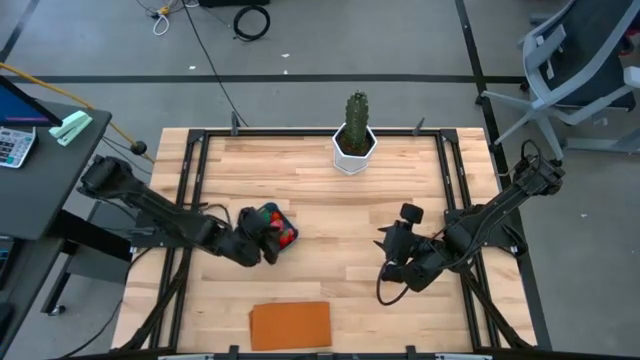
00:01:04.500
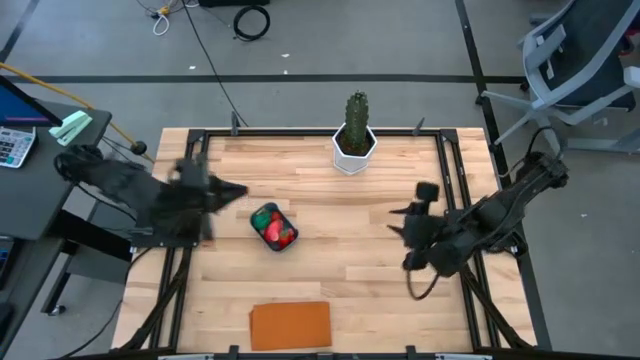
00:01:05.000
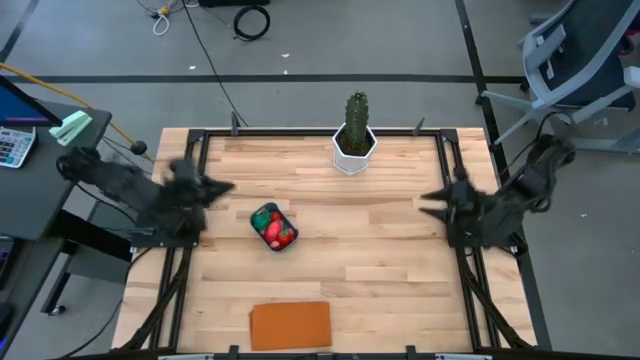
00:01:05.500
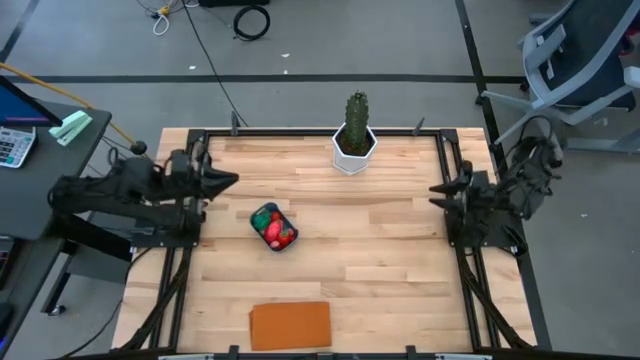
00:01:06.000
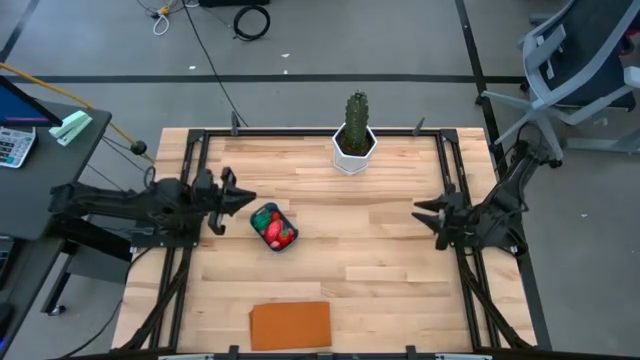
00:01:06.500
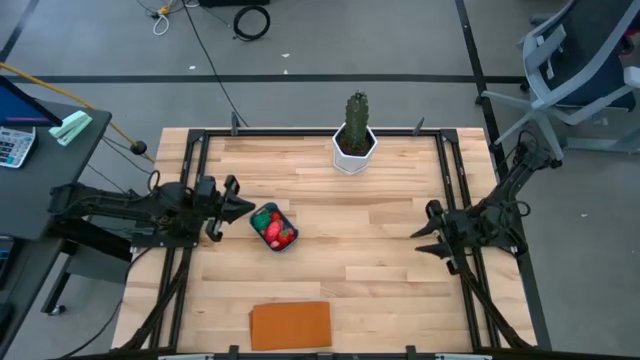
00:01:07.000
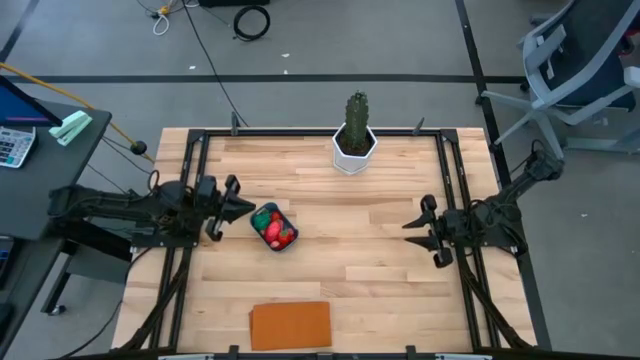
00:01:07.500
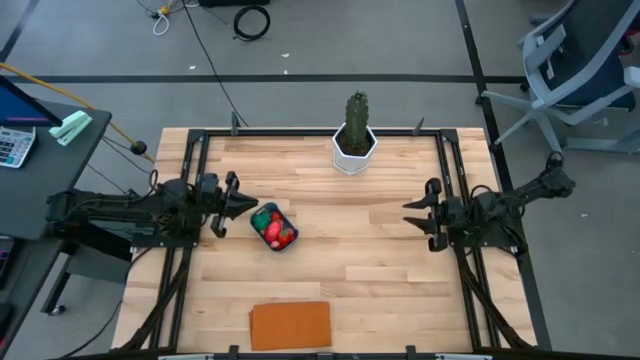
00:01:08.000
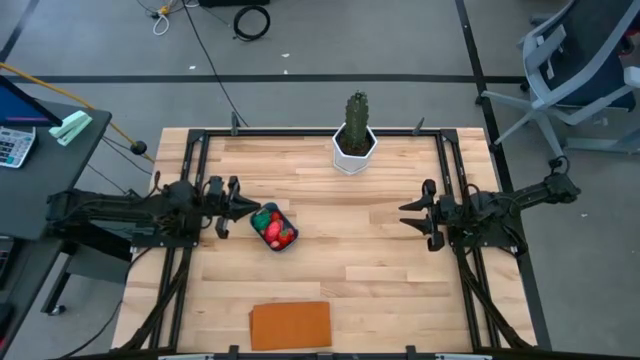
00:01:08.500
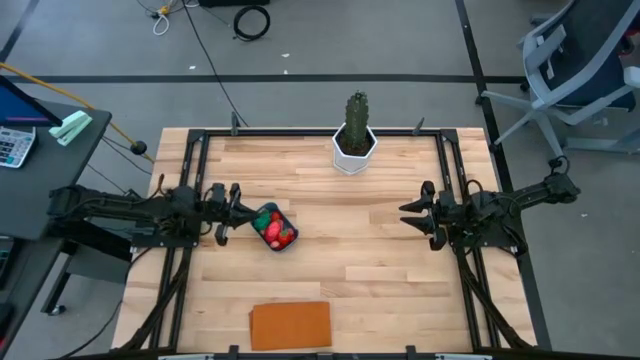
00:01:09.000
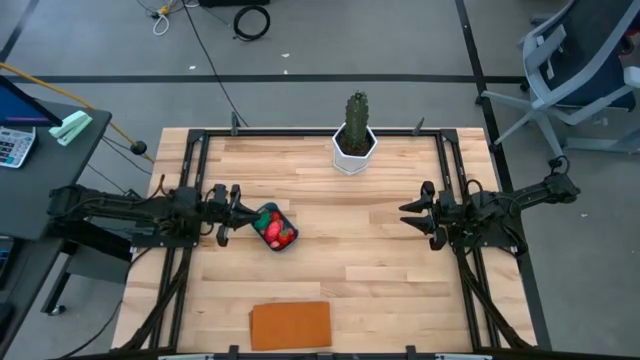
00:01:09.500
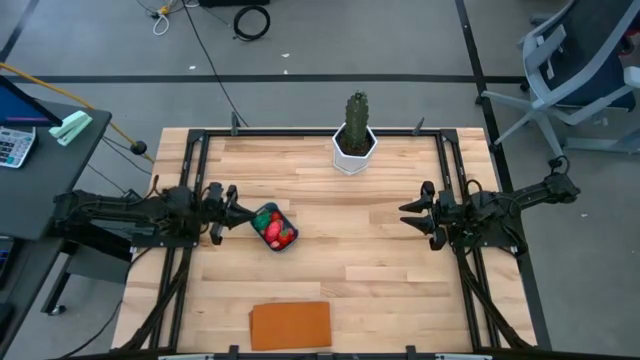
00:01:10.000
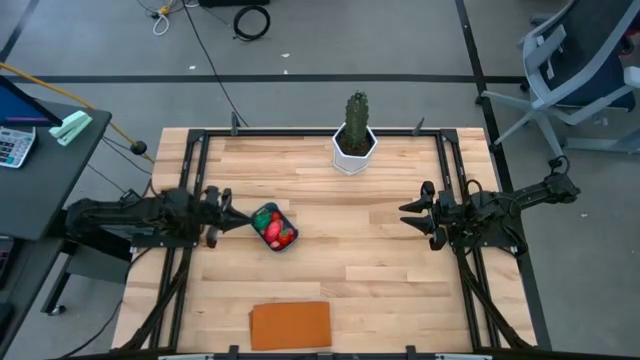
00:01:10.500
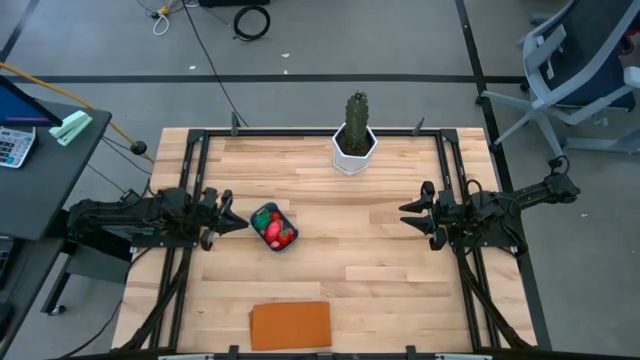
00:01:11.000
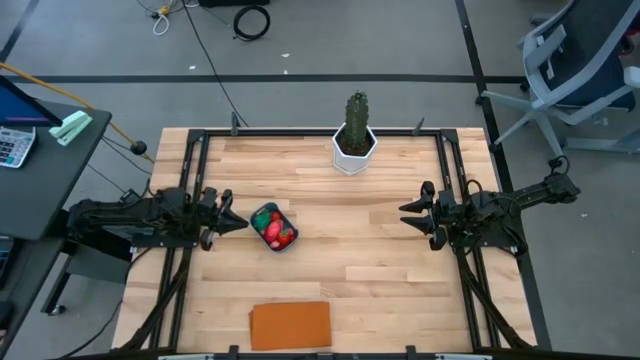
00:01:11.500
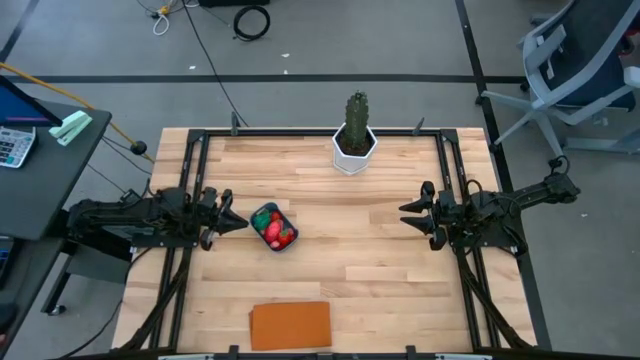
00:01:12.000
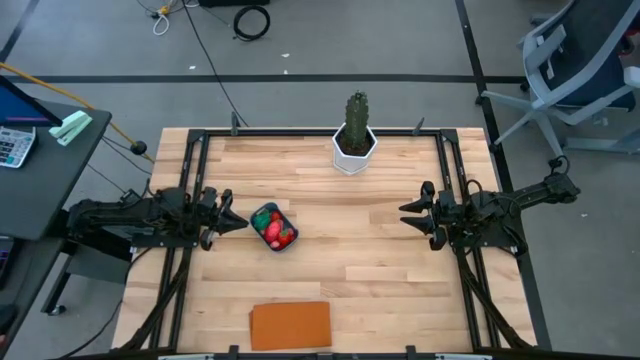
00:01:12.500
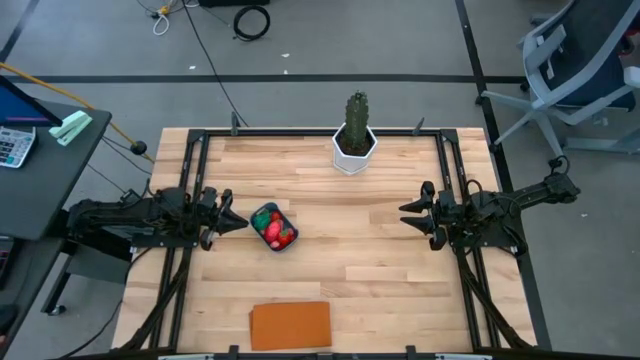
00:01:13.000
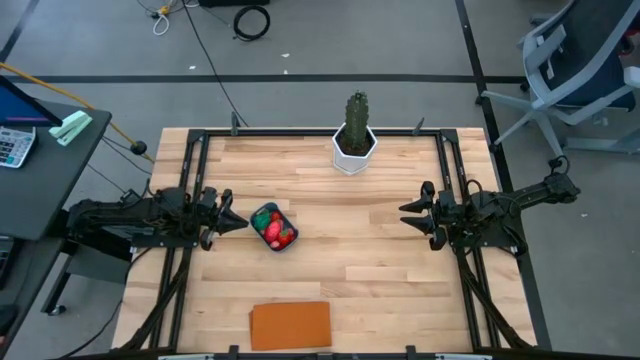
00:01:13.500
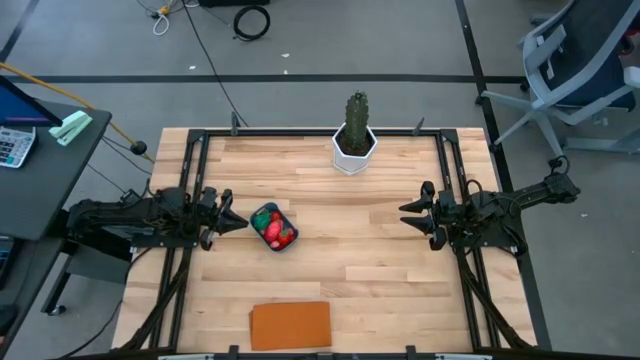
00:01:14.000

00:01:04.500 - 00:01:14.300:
Task: Pick and placing Produce into tupperware
Return to Home Position

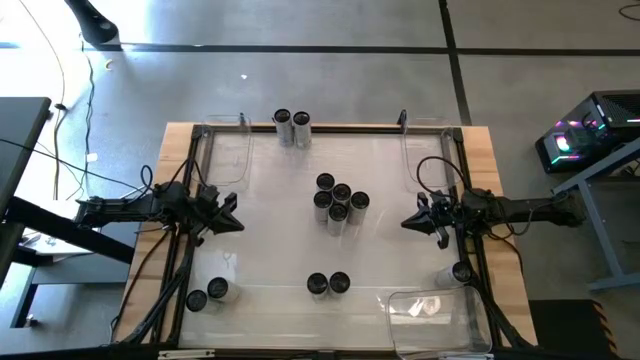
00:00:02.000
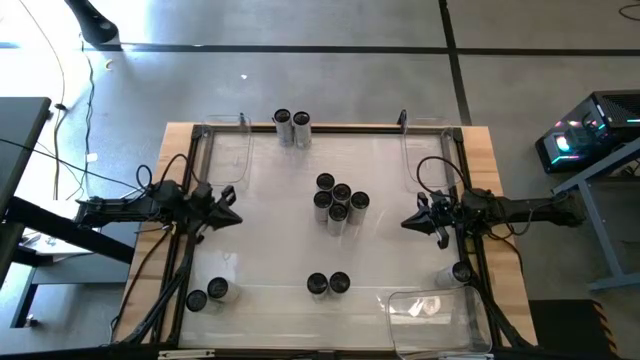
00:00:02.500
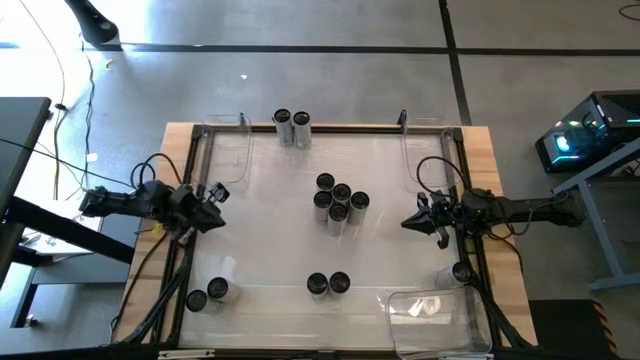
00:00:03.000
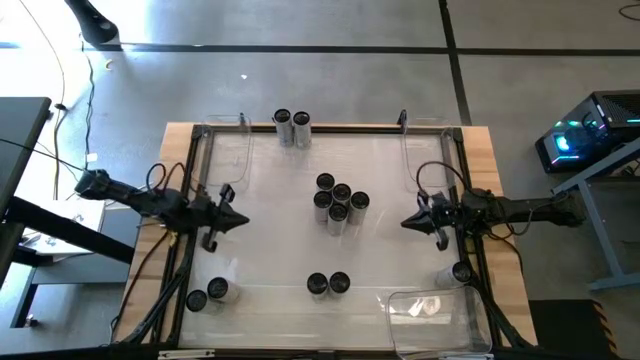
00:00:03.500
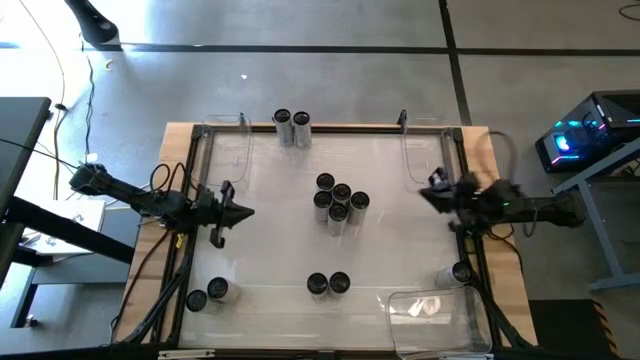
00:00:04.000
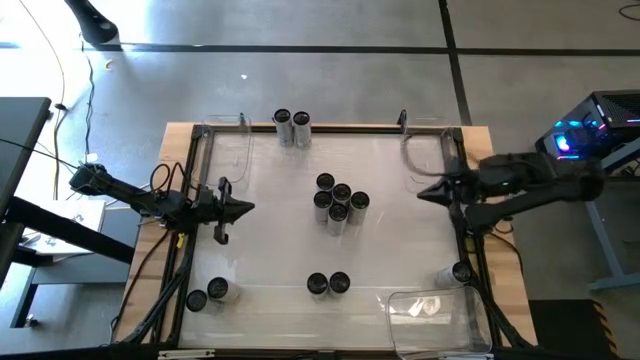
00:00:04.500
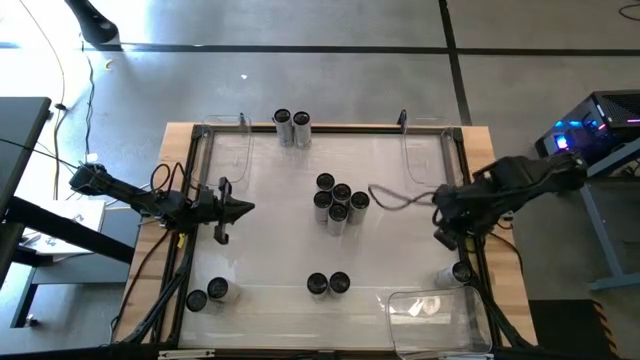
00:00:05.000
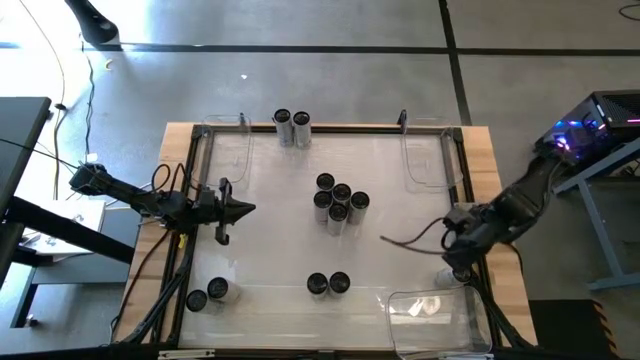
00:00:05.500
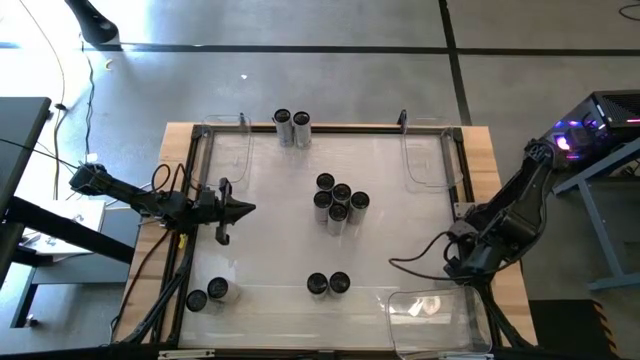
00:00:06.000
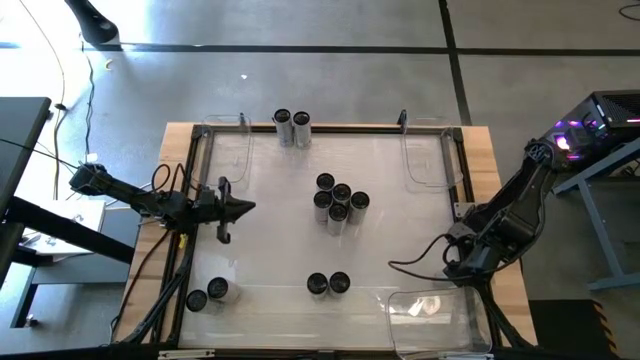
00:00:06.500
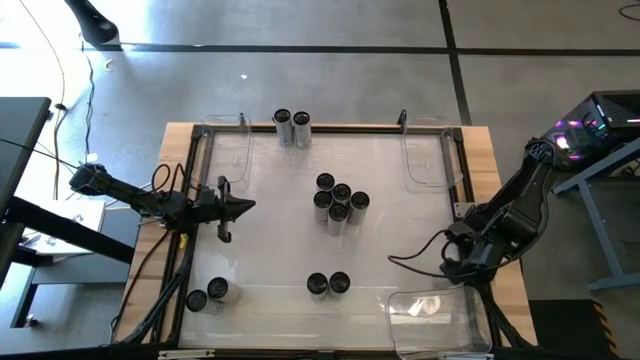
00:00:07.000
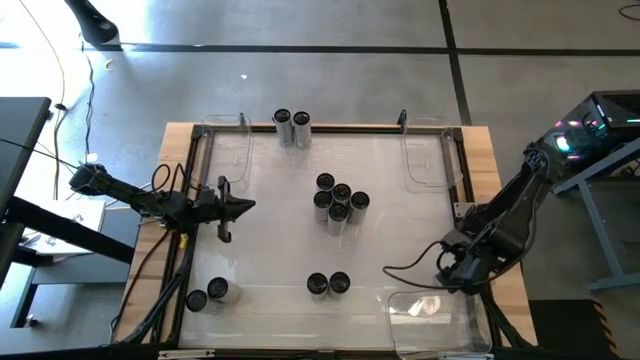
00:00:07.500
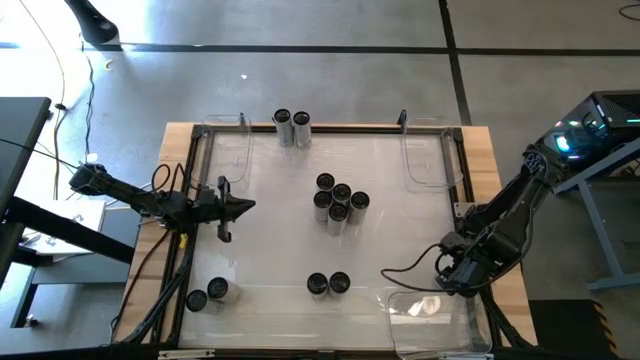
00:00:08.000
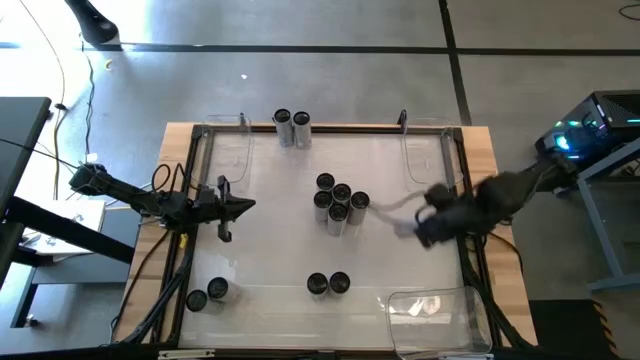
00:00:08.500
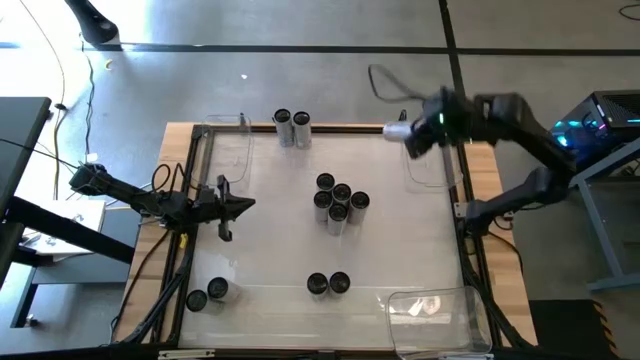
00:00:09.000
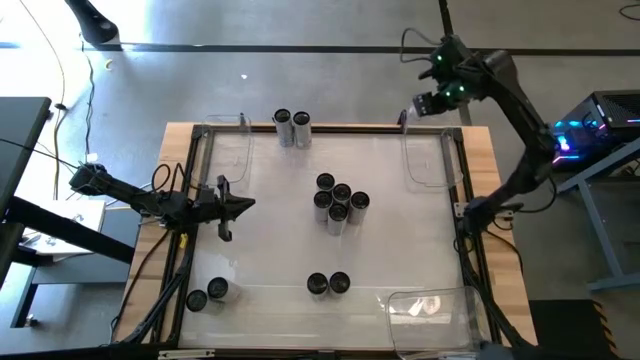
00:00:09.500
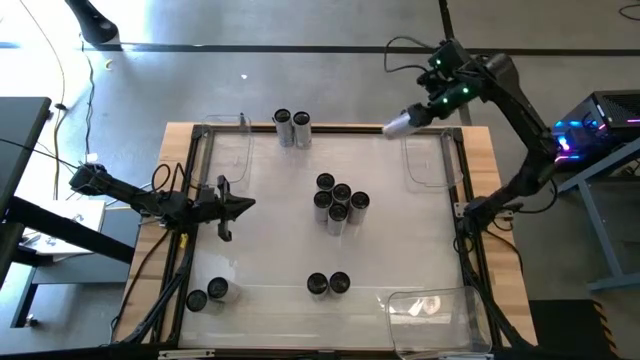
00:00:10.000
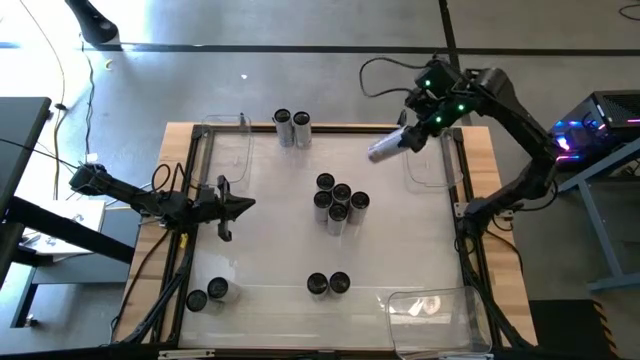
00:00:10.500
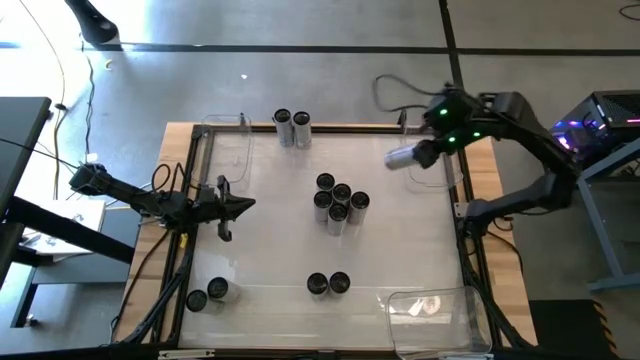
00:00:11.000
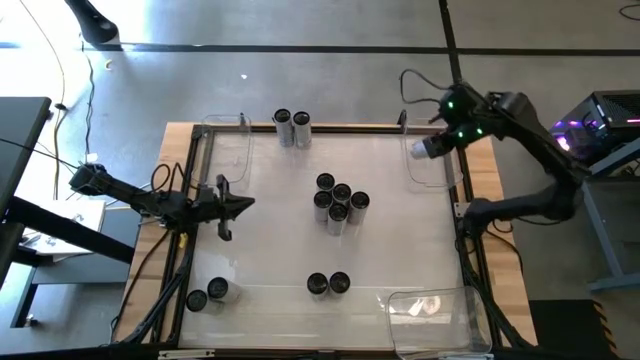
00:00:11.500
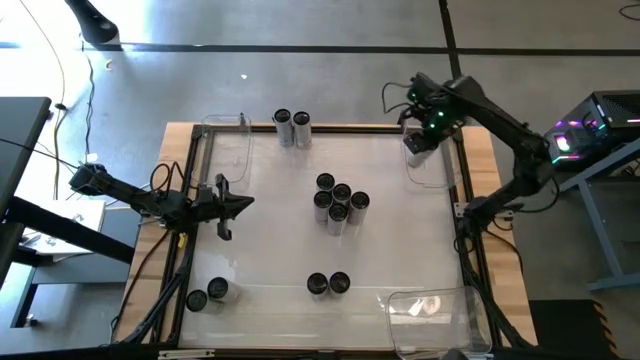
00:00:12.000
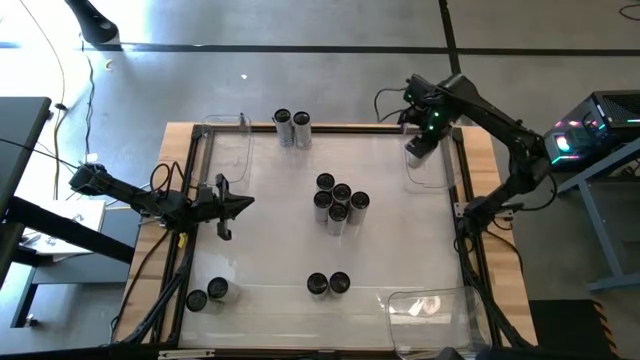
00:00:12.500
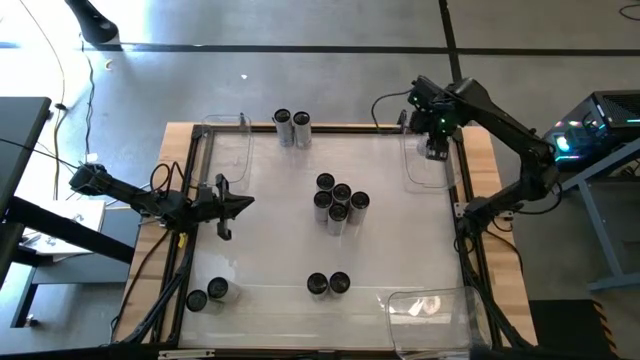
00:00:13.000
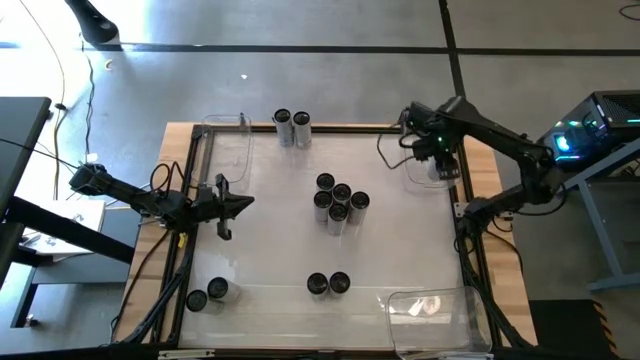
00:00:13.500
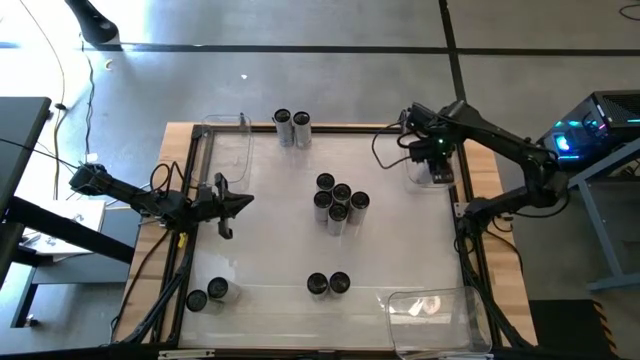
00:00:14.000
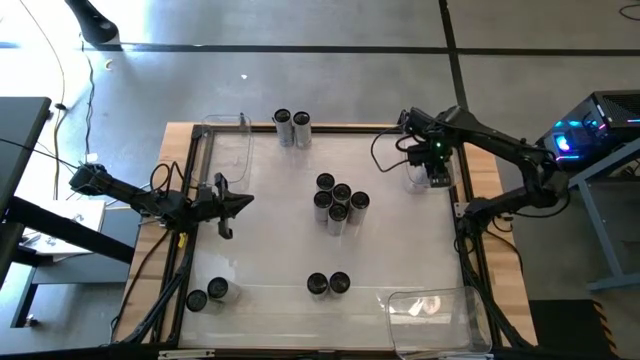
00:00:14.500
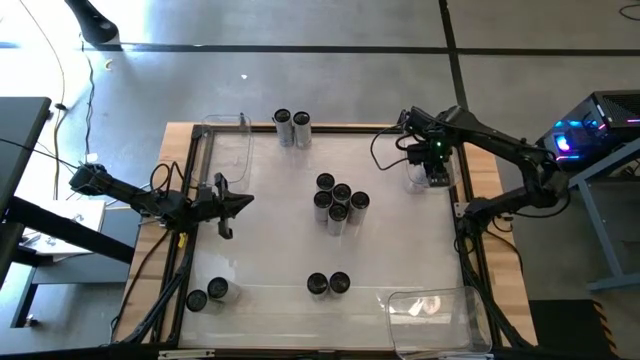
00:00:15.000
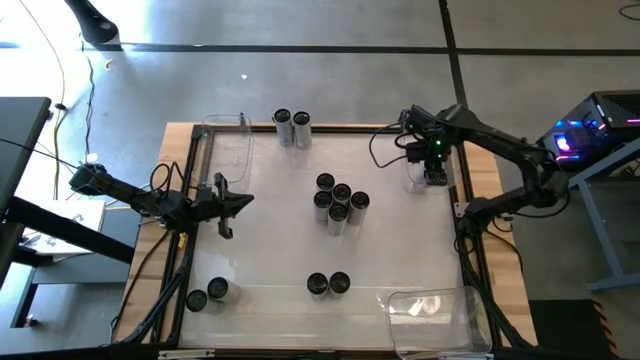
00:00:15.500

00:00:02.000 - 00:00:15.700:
Task: Sort soda cans
Put the yellow soda can into the top right transparent bin
